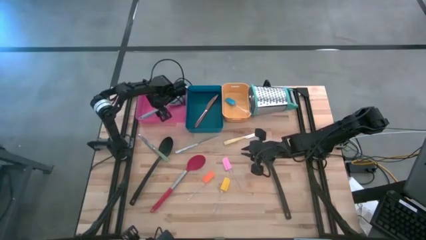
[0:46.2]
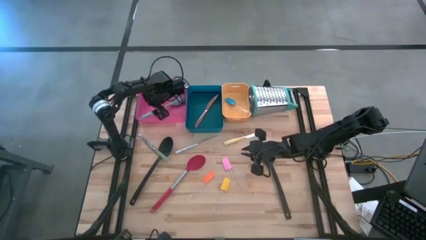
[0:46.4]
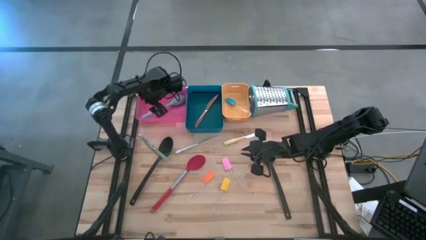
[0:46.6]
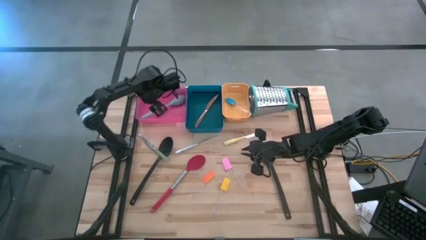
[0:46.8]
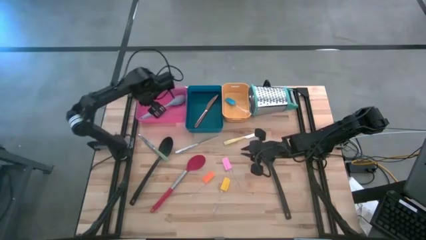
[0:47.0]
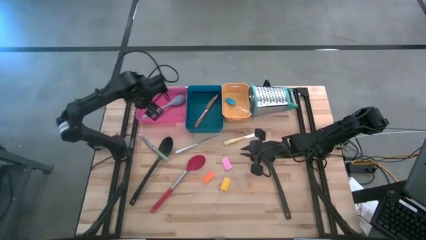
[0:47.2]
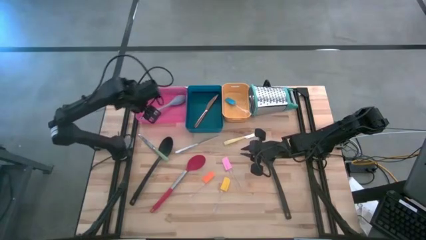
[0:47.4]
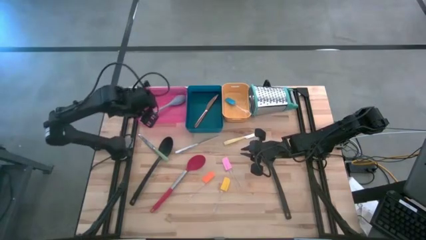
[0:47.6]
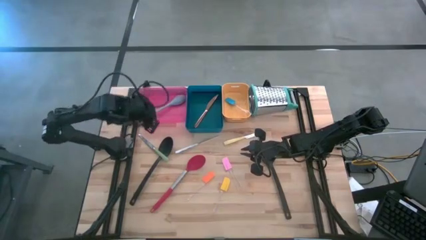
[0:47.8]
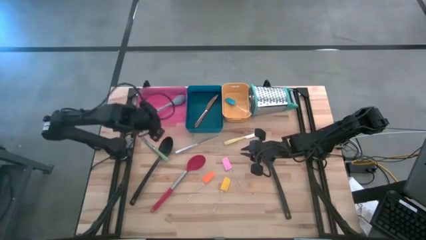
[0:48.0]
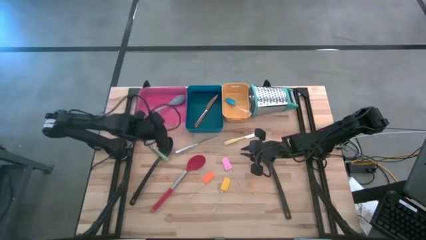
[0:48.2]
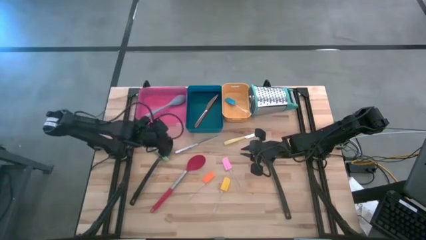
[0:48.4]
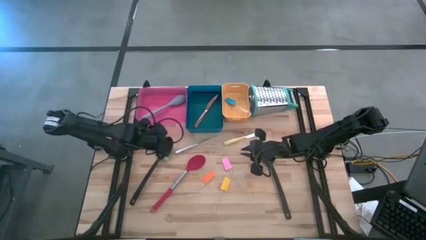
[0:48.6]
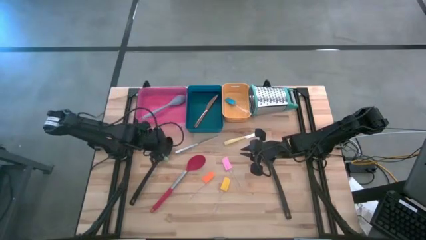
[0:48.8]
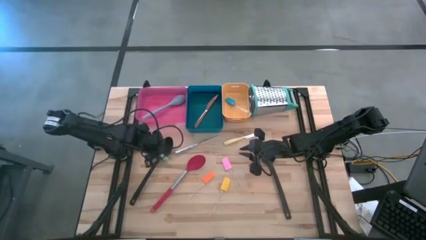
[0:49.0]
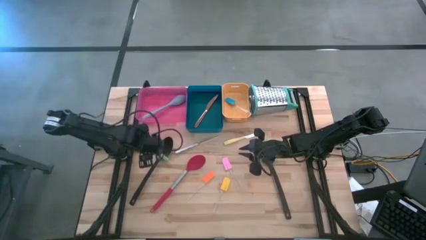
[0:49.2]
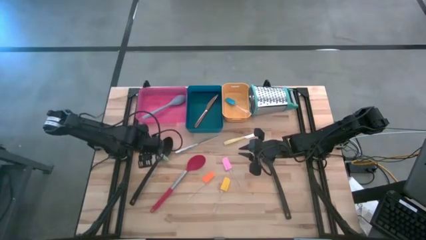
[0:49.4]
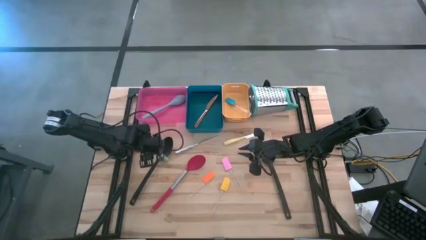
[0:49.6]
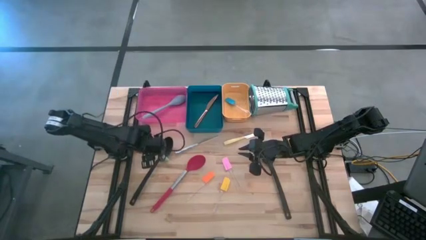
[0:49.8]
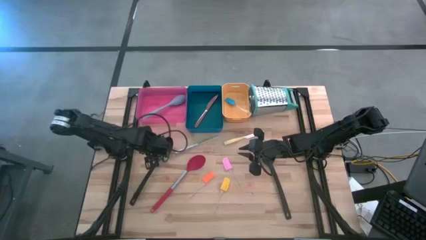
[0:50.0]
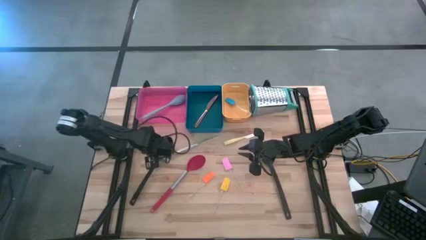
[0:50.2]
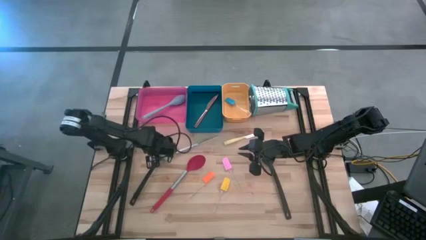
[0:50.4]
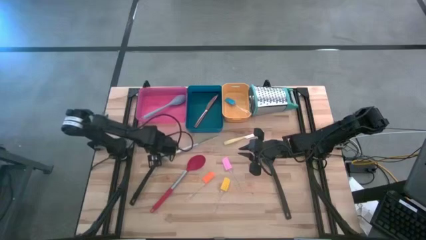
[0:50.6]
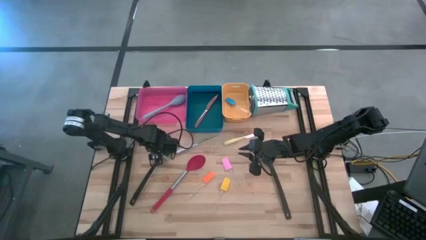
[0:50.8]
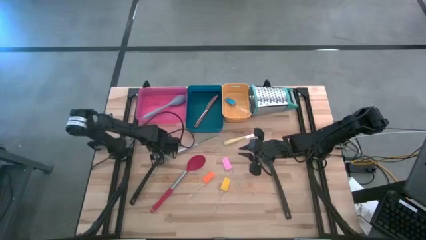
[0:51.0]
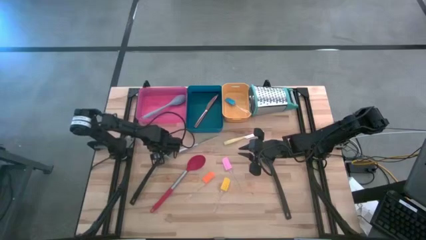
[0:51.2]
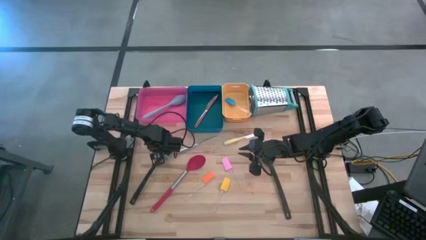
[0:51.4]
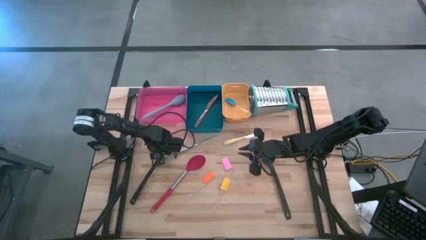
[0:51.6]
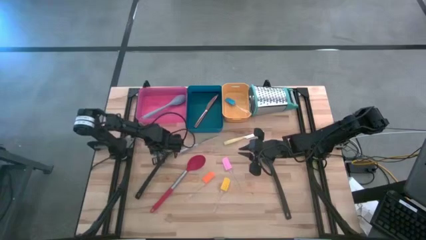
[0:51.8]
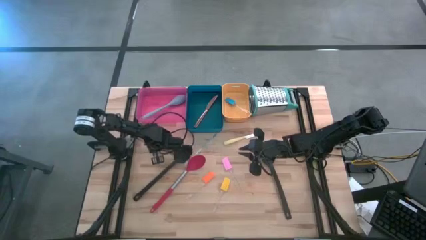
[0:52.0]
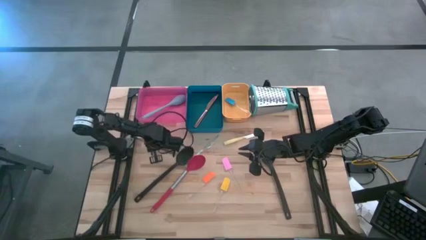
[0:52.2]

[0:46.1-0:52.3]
Task: Pick & Place Kitchen Items
Put the green knife into the blue bin

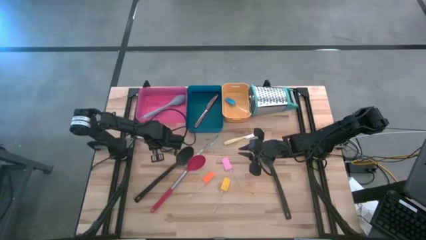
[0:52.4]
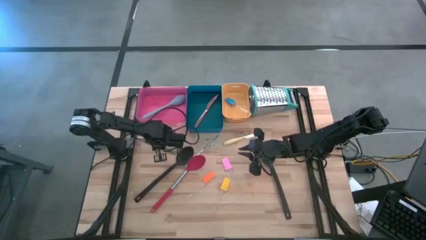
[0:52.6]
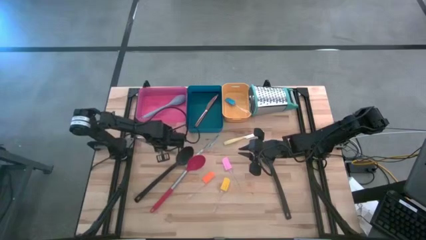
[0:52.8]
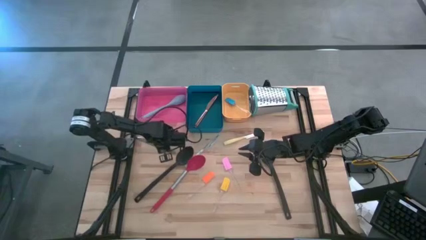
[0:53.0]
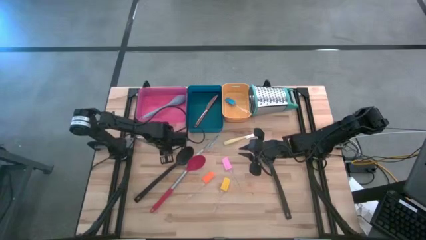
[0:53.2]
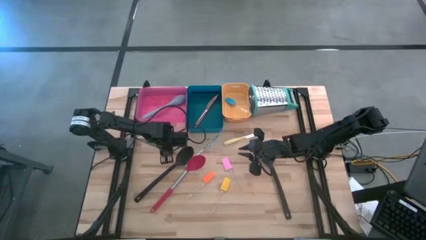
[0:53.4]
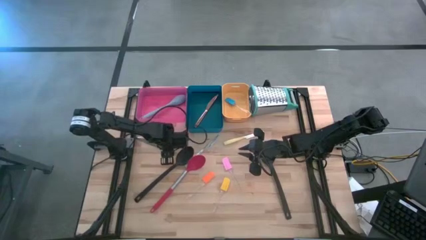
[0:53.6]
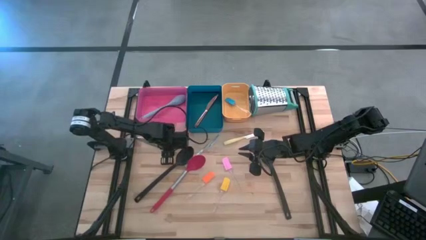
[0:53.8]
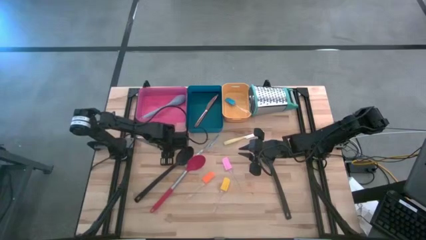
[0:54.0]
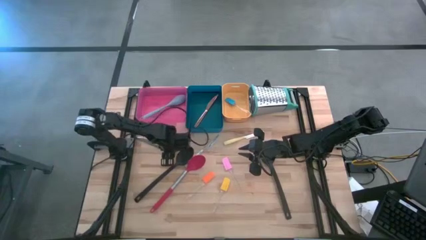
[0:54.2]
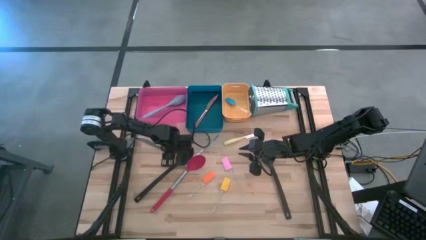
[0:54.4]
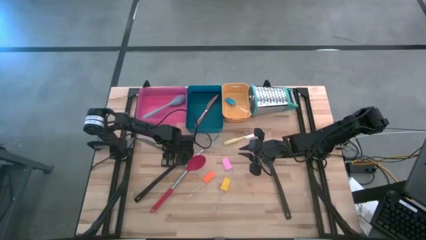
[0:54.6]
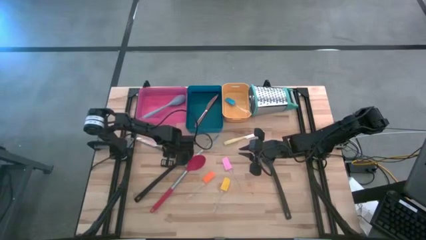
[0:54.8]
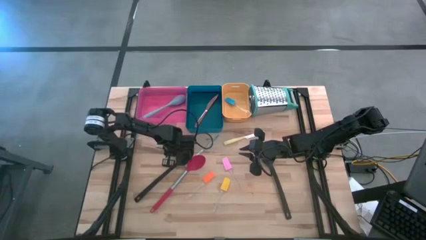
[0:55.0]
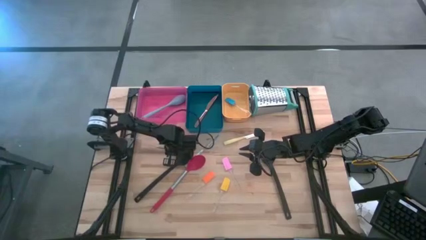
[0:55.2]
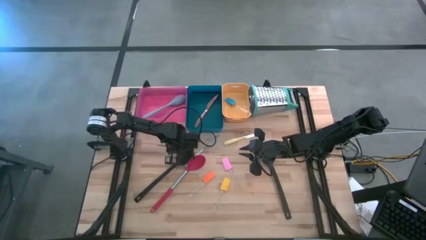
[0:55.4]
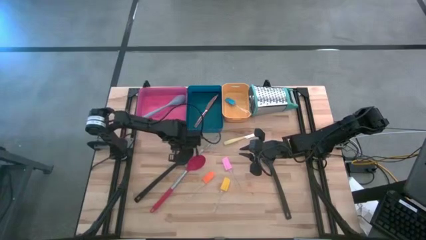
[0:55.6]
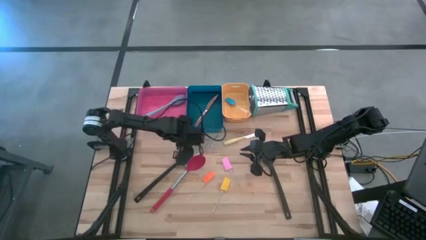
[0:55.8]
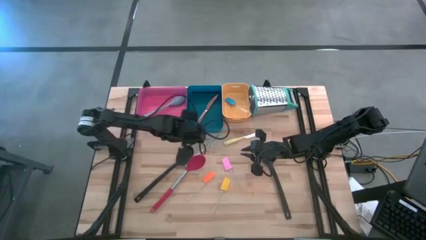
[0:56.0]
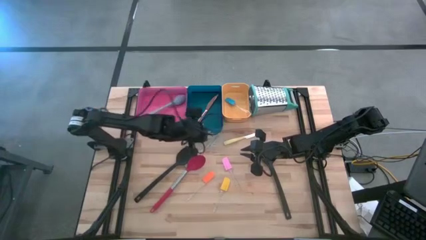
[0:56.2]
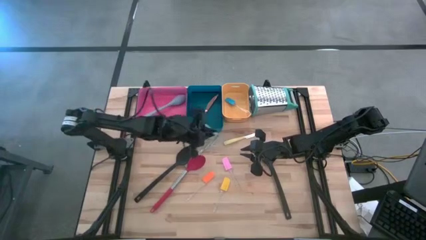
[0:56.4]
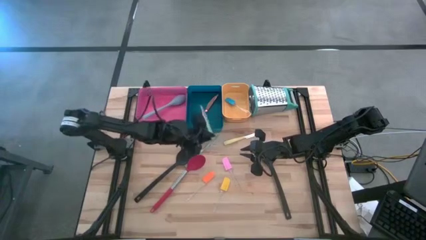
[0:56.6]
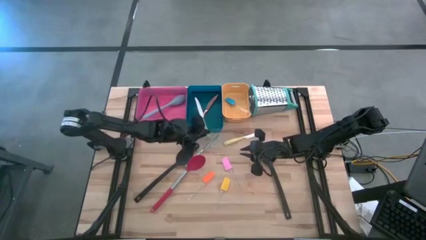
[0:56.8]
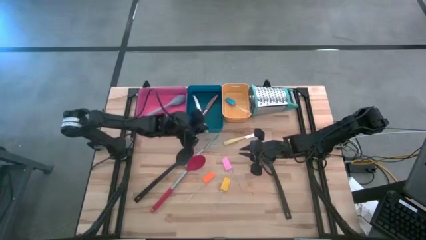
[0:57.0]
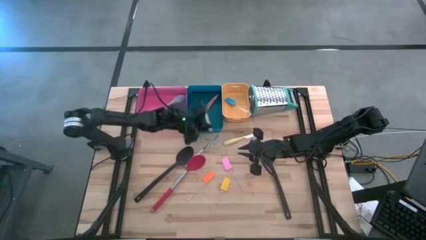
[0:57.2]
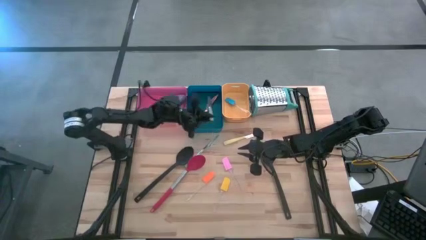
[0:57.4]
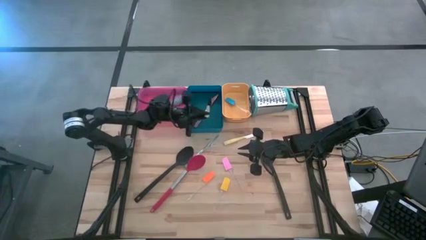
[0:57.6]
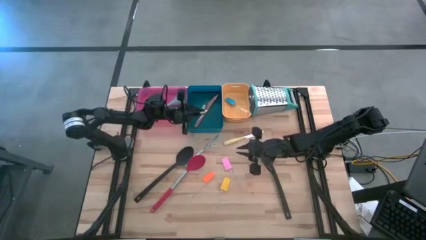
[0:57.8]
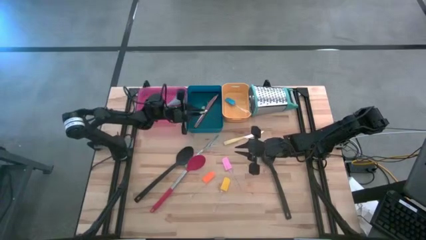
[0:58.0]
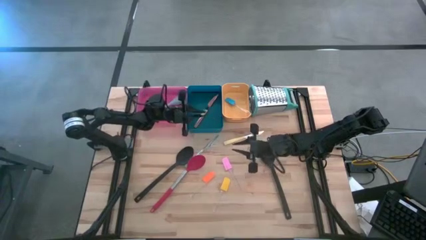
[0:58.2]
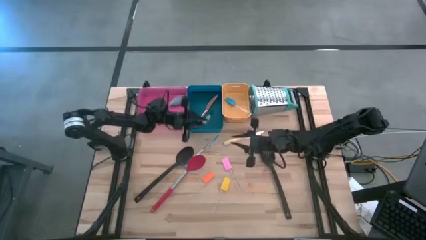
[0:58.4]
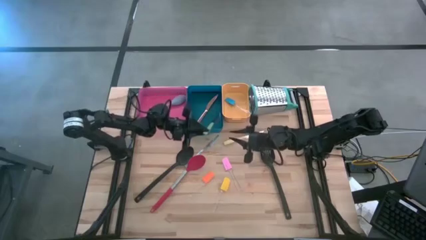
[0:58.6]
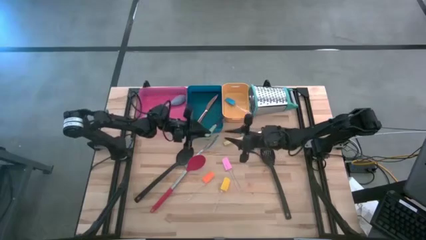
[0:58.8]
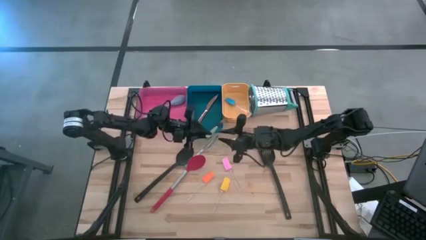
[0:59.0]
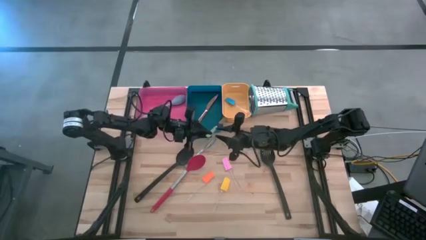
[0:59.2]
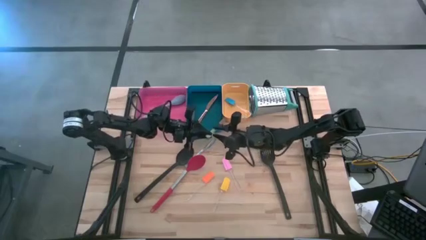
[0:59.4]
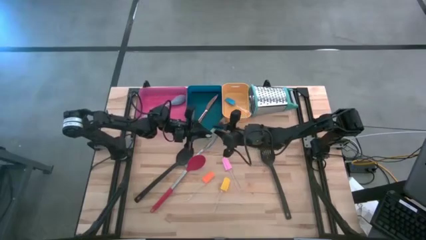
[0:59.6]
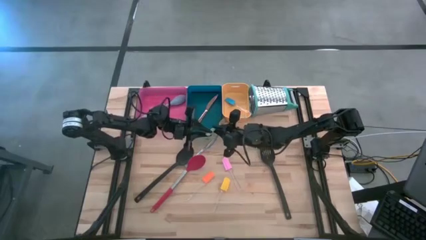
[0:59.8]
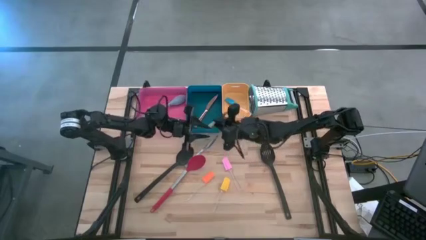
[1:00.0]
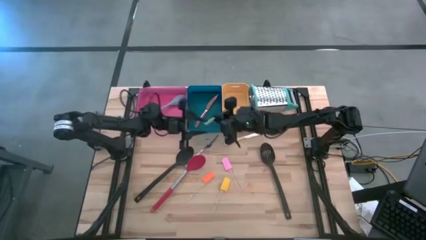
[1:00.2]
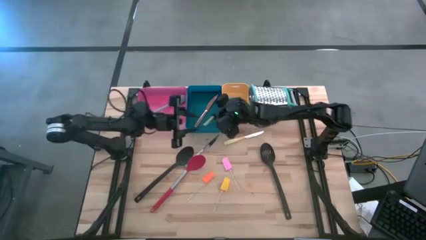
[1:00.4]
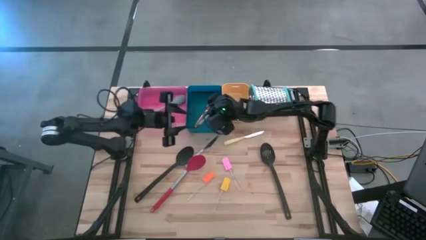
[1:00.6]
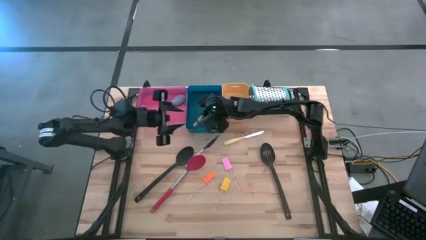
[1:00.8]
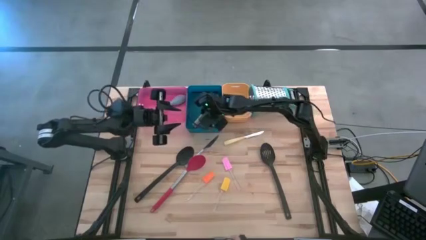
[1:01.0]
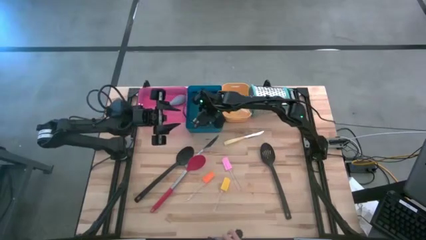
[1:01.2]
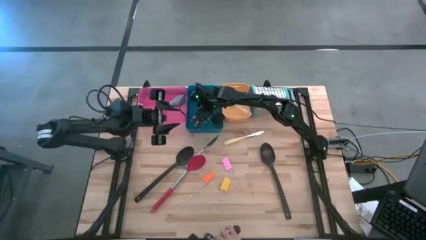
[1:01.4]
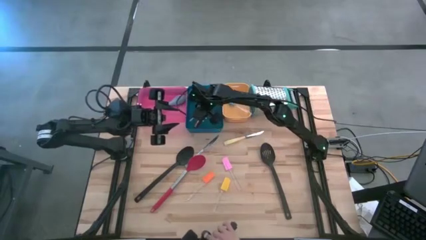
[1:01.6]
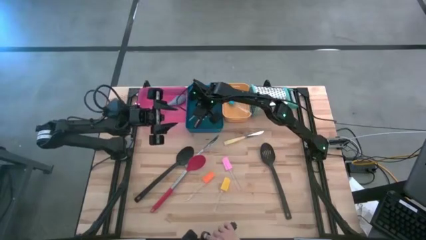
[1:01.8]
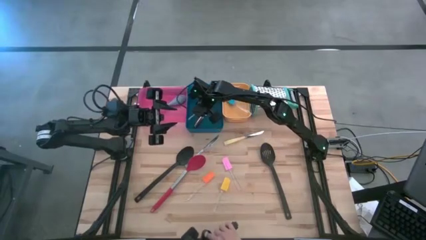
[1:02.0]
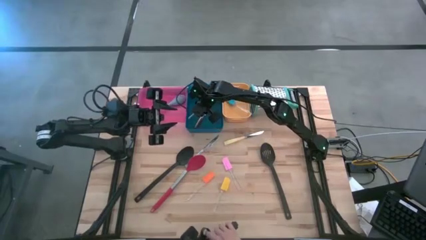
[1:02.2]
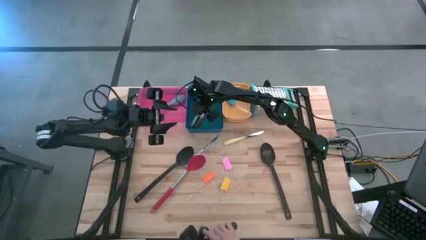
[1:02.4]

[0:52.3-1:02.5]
Put the green knife into the blue bin
